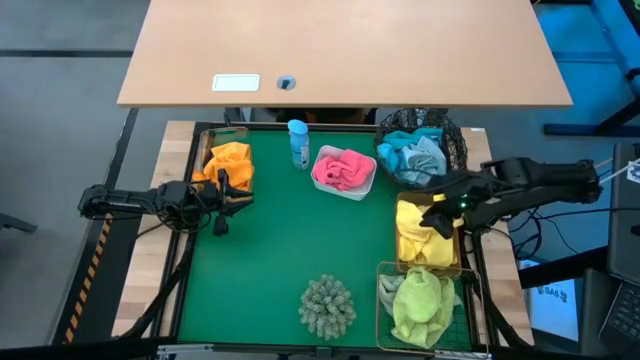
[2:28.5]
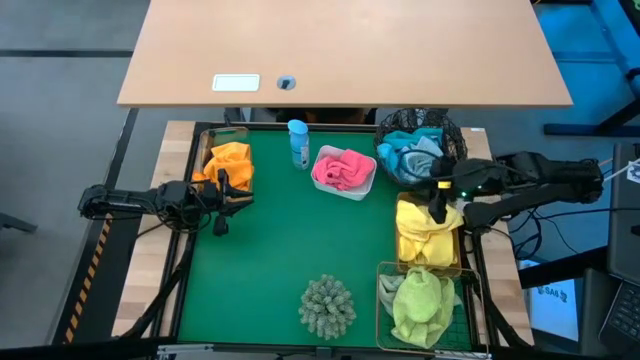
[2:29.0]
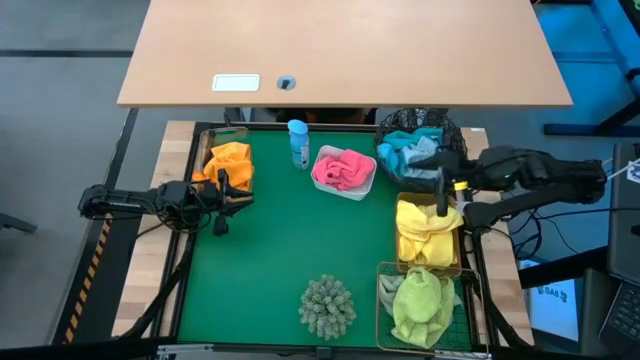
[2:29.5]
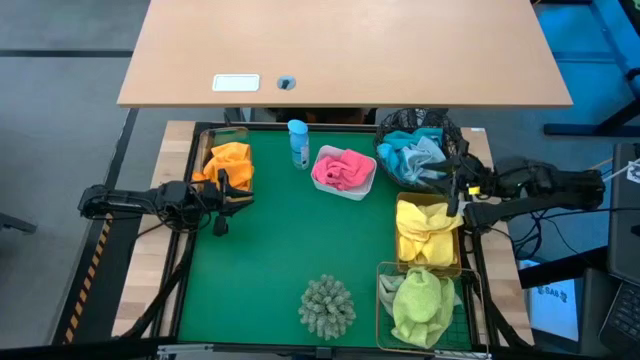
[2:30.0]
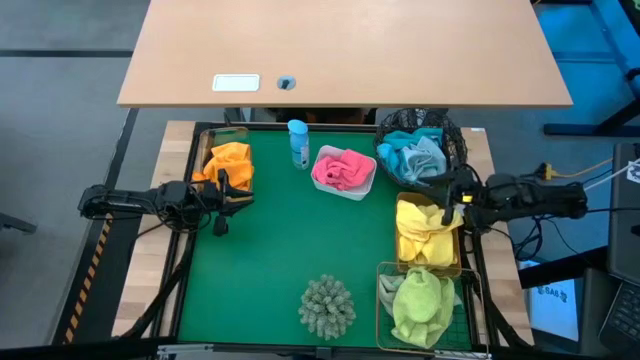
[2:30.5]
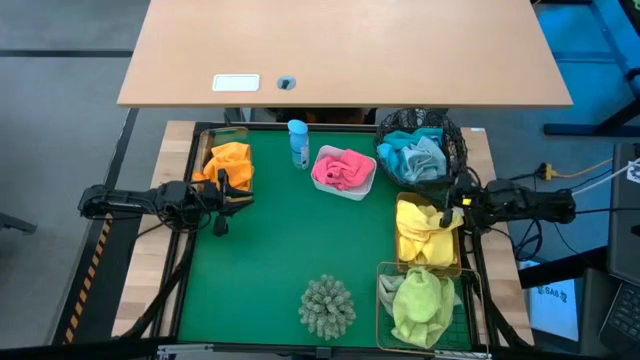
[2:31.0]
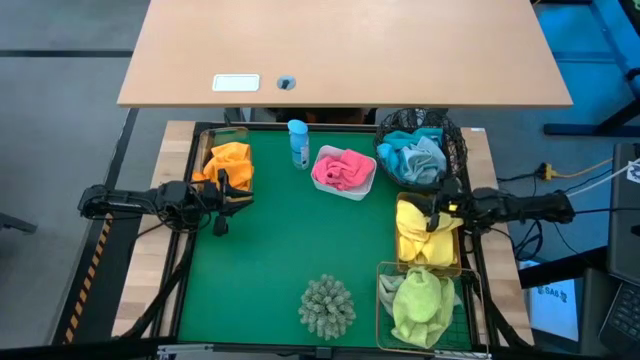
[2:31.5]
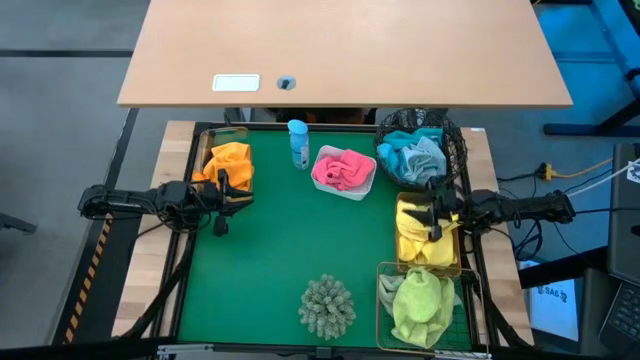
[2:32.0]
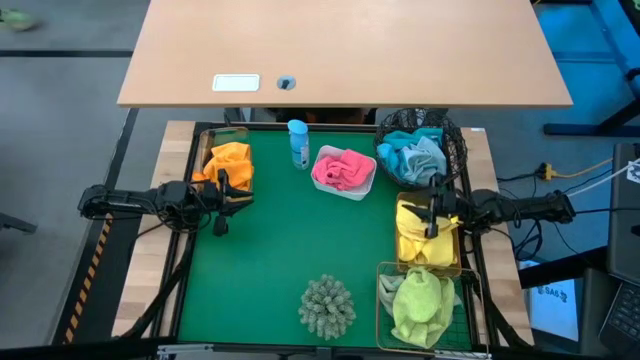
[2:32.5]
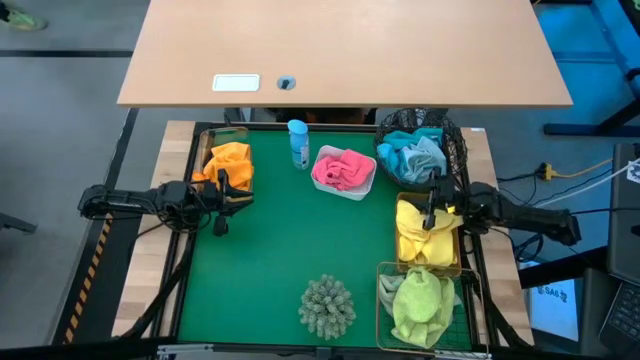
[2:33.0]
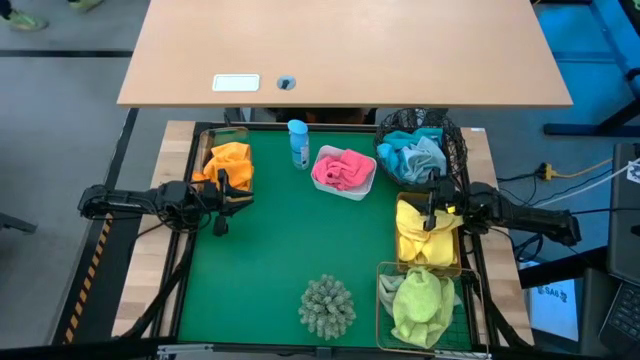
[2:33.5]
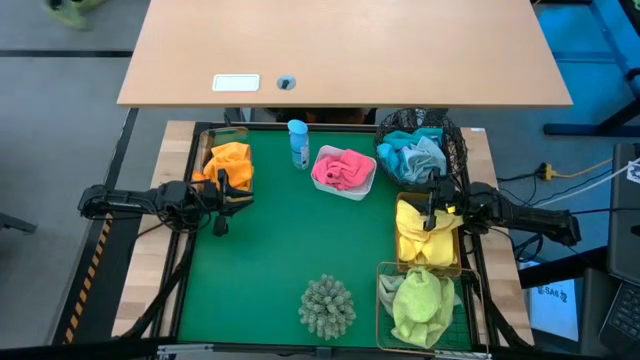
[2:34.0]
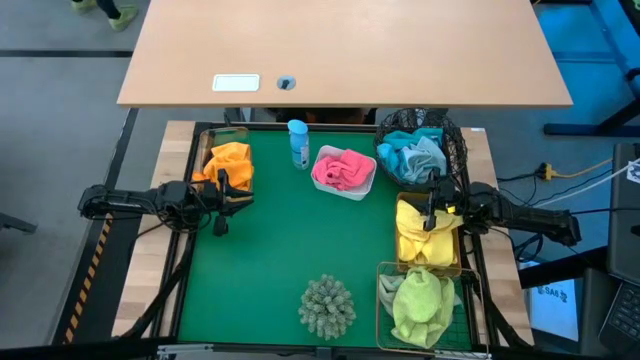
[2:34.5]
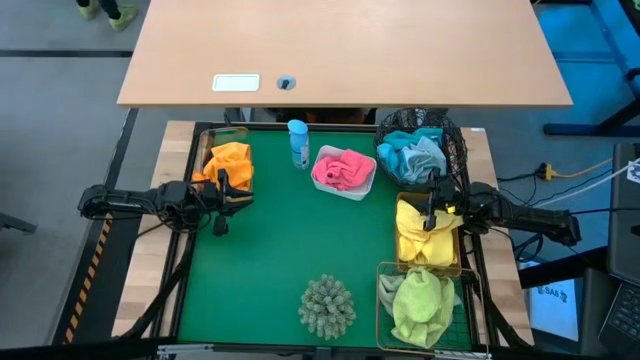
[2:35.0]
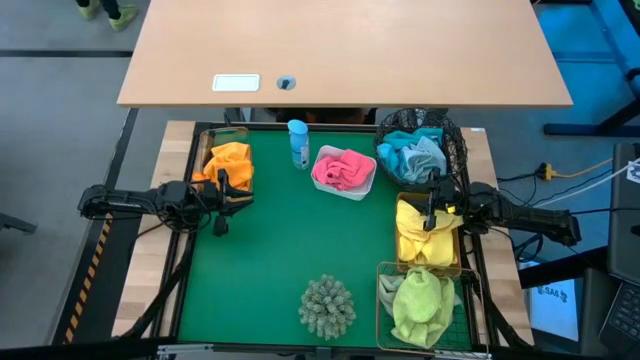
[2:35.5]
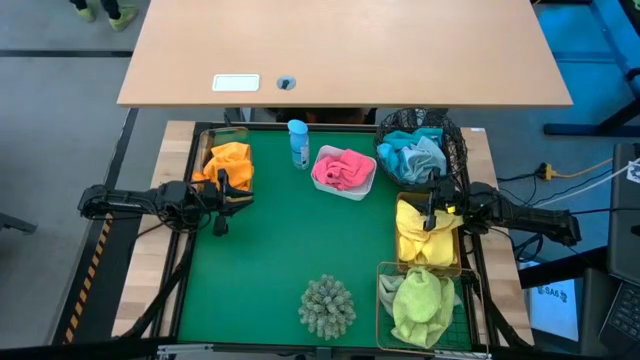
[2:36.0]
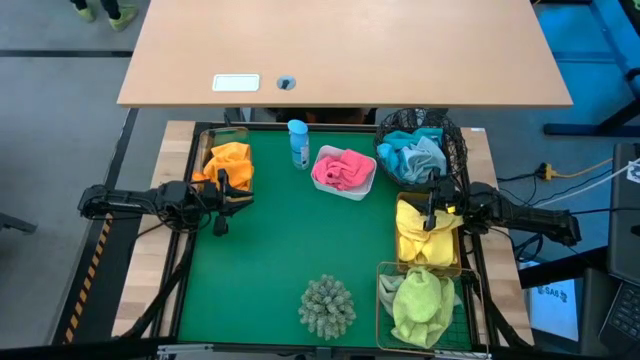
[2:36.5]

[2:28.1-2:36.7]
Task: Sort microfiber towel by color & place in baskets
Return to Home Position

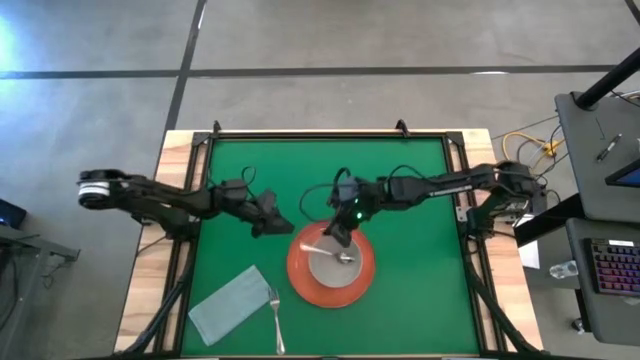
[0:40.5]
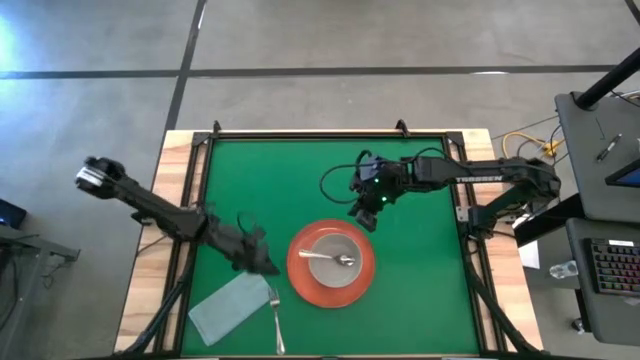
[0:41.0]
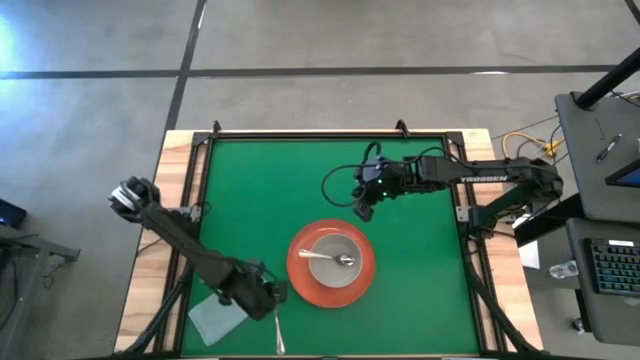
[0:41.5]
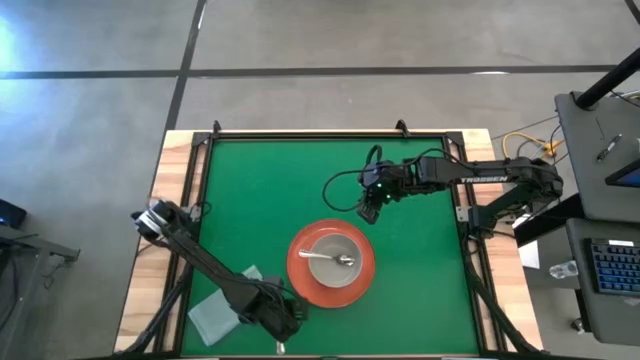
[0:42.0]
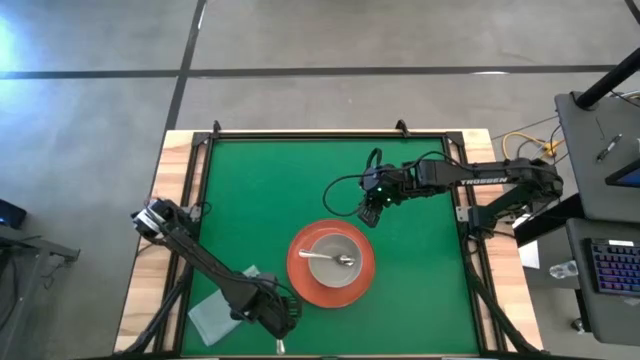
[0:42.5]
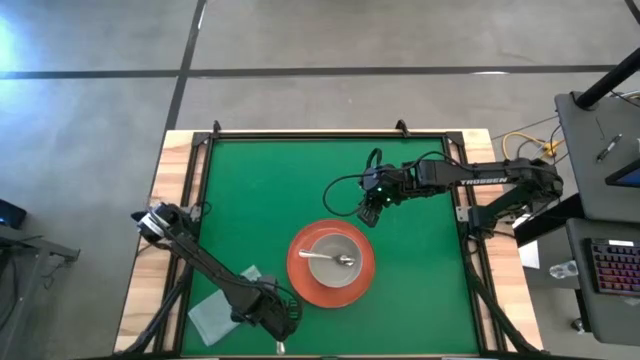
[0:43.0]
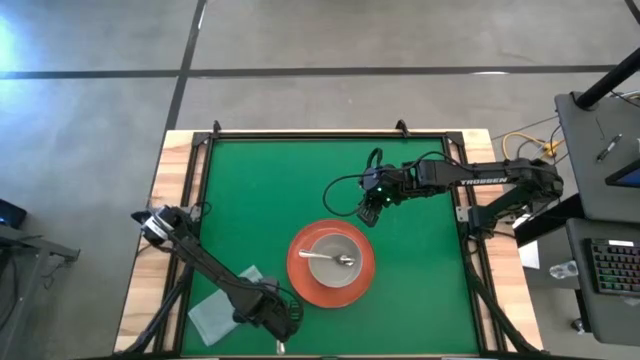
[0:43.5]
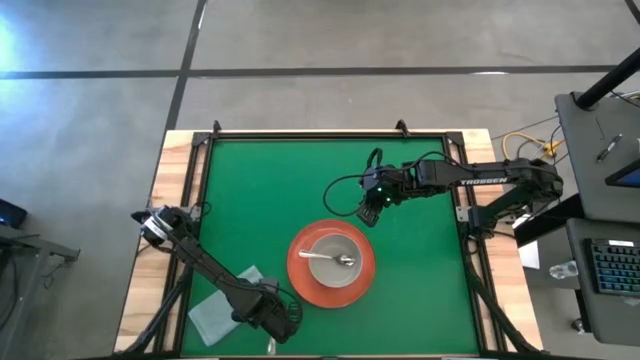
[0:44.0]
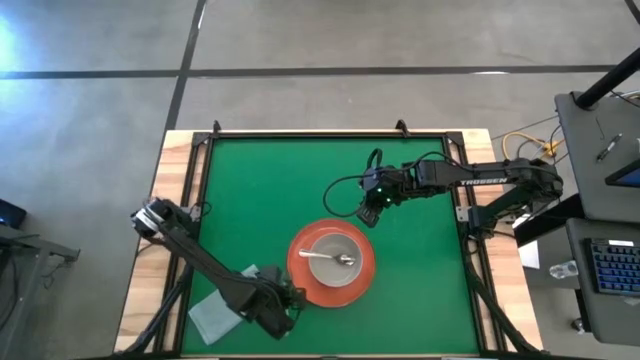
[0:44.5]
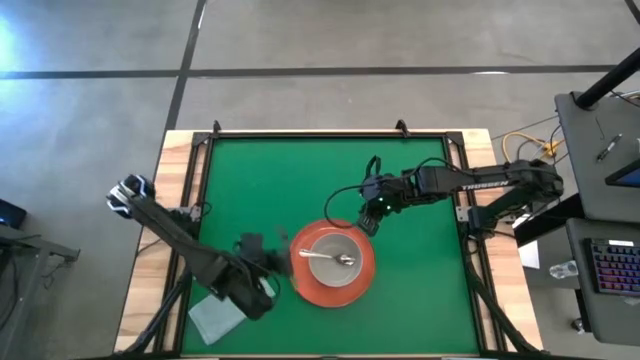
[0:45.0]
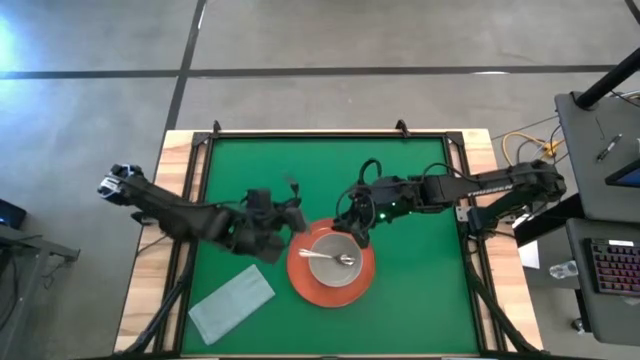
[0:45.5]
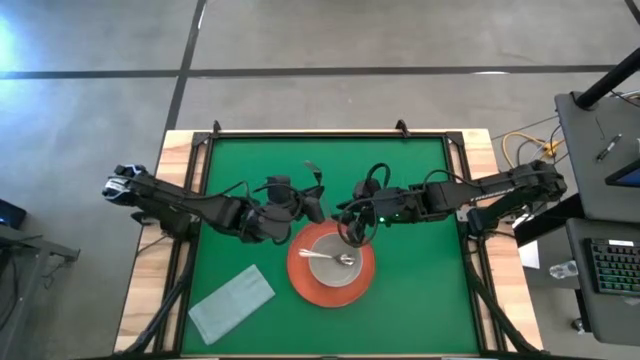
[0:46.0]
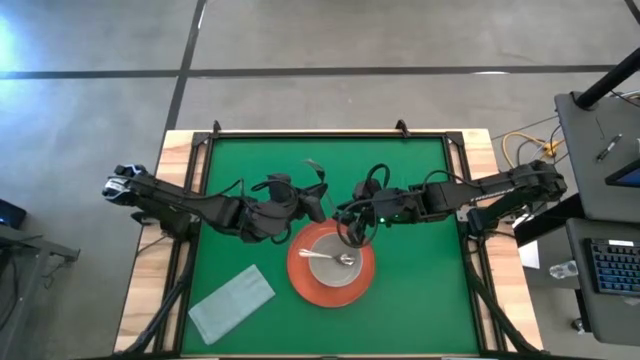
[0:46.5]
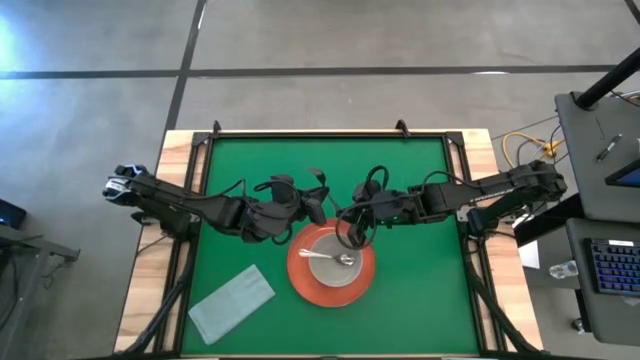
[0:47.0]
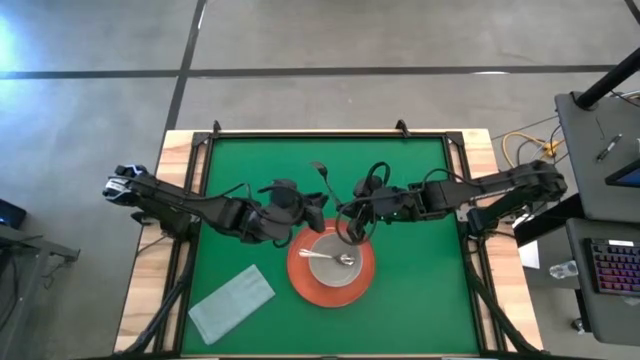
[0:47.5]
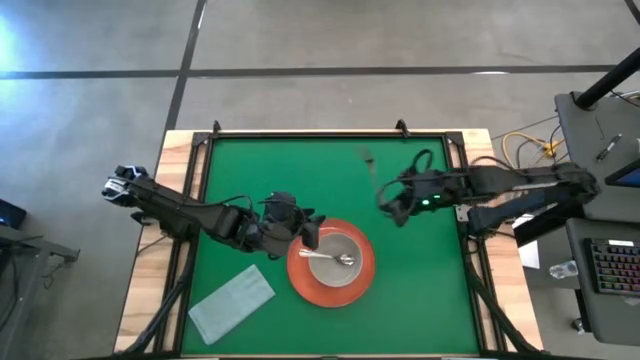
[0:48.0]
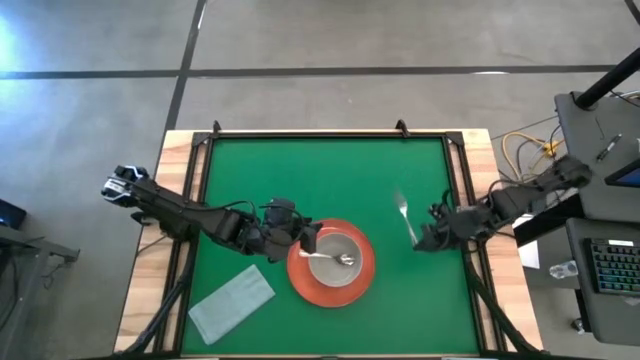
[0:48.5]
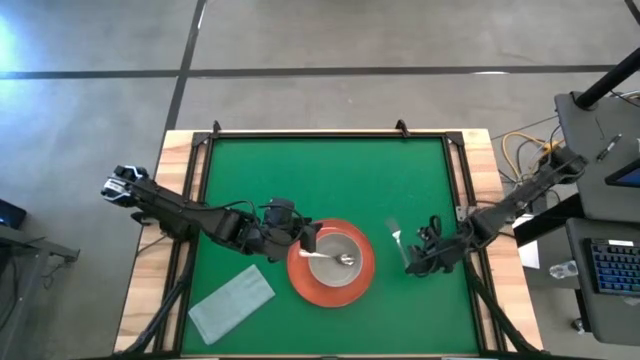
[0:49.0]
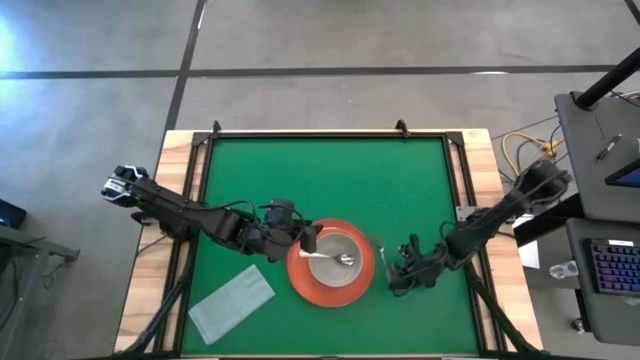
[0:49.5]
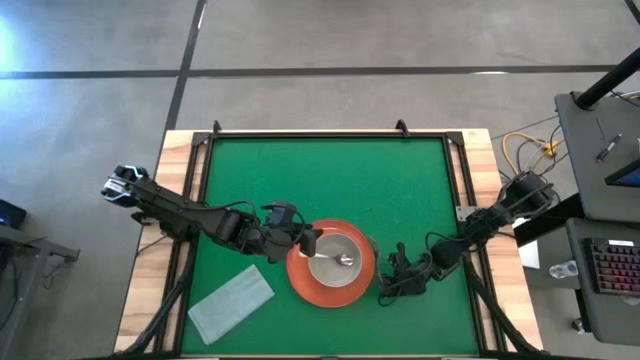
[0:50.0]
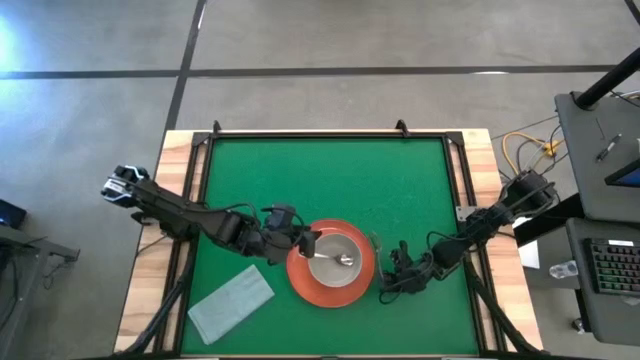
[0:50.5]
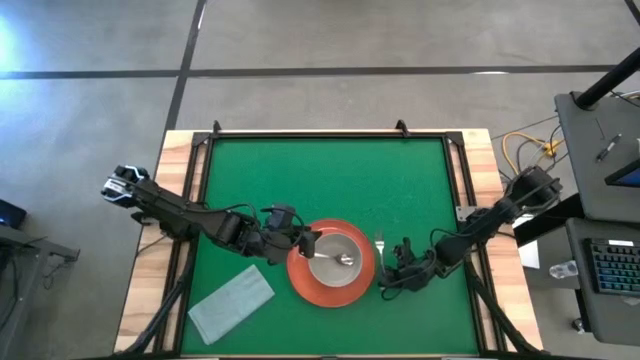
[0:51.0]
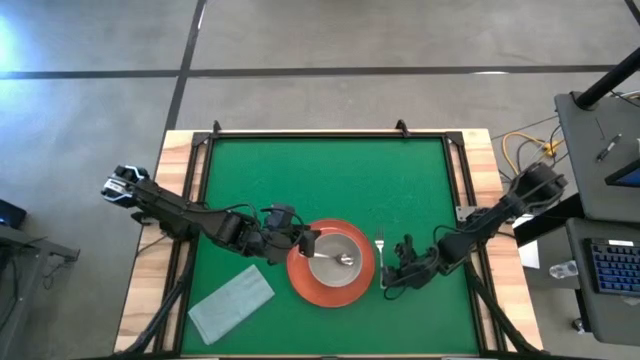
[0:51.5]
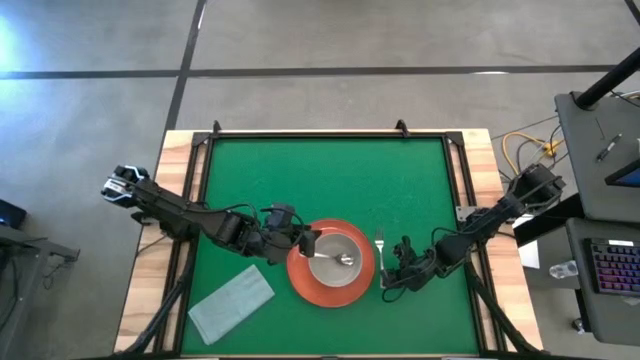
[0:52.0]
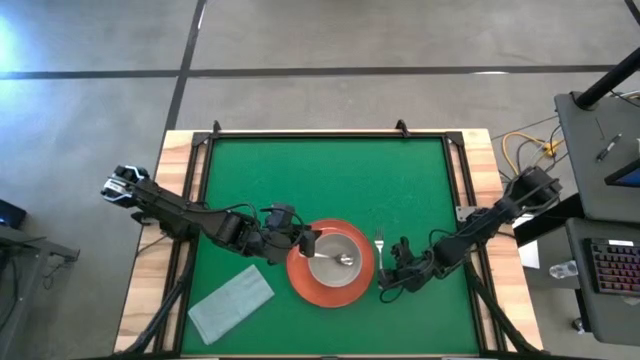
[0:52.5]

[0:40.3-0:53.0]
Task: Set table place
Put the silver fork to the right of the orange plate
